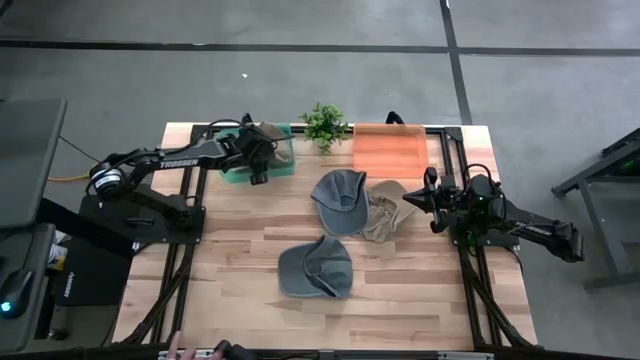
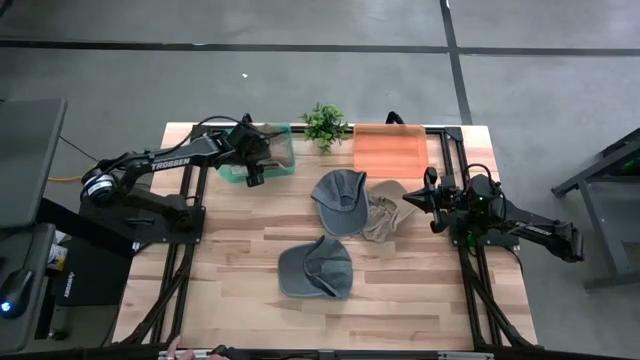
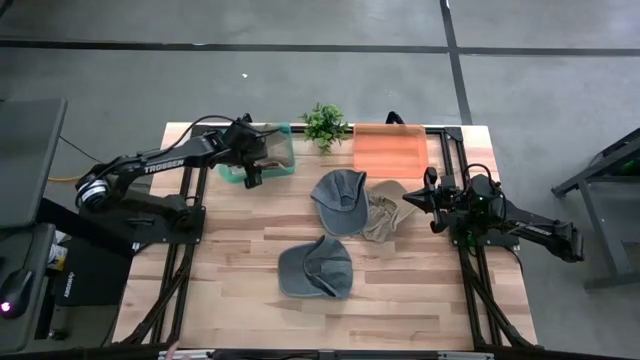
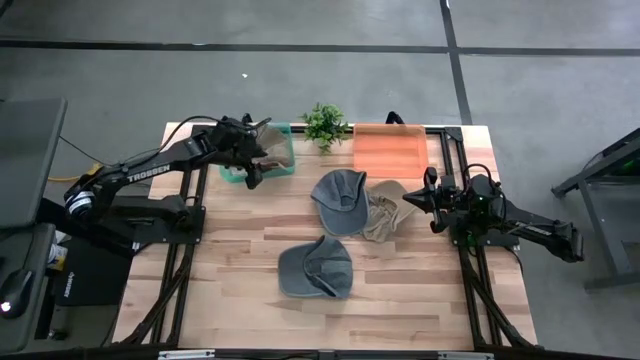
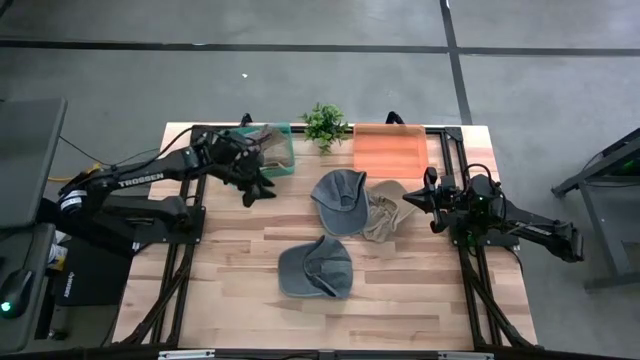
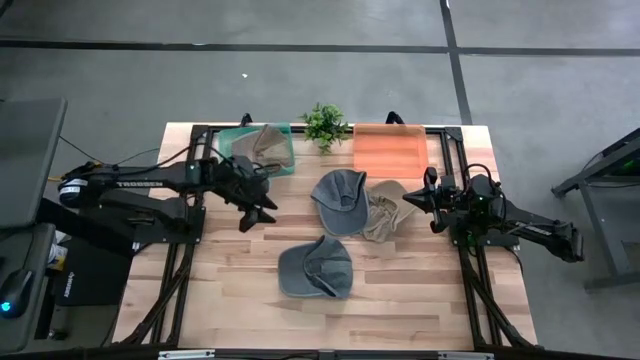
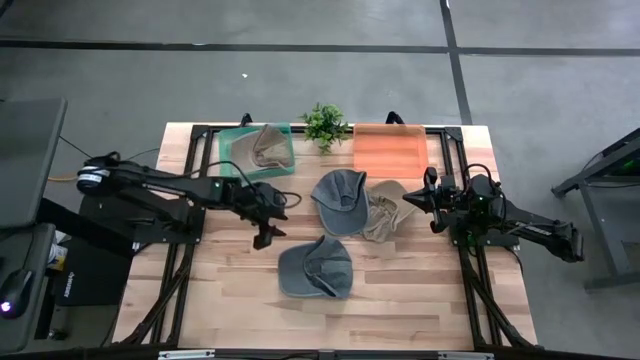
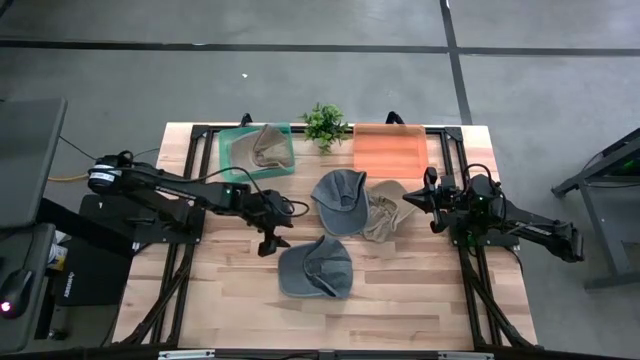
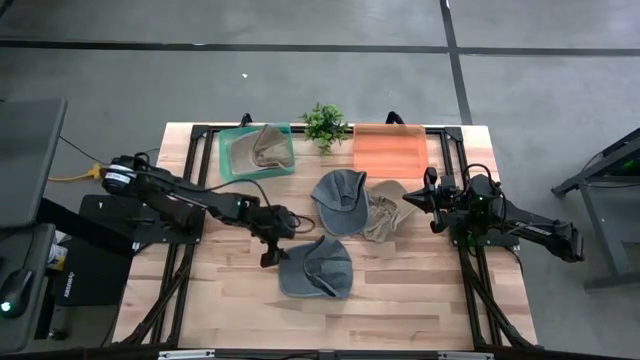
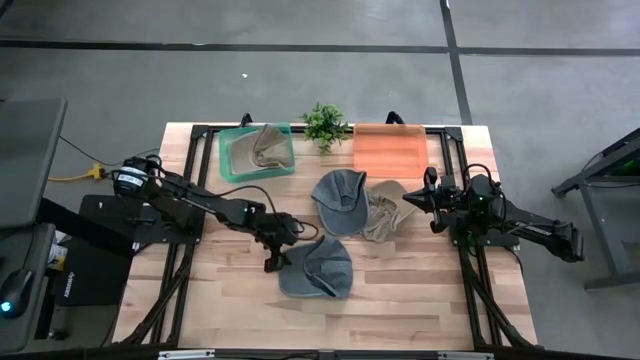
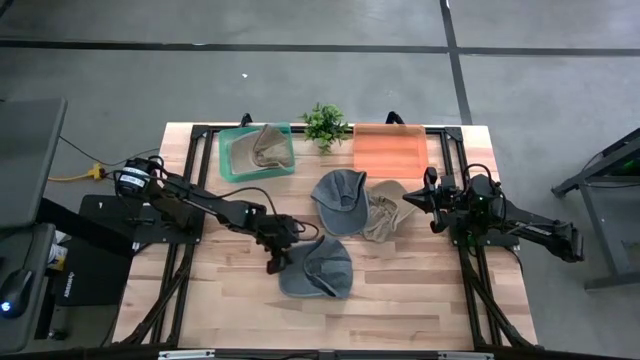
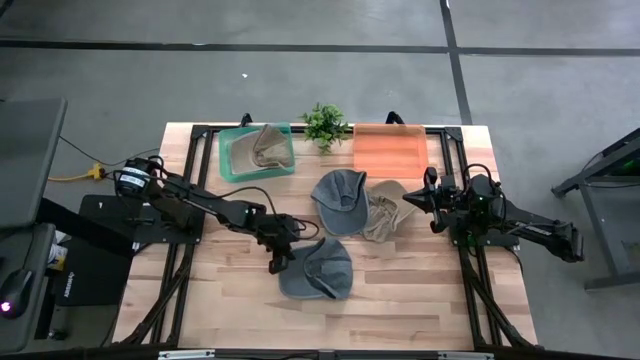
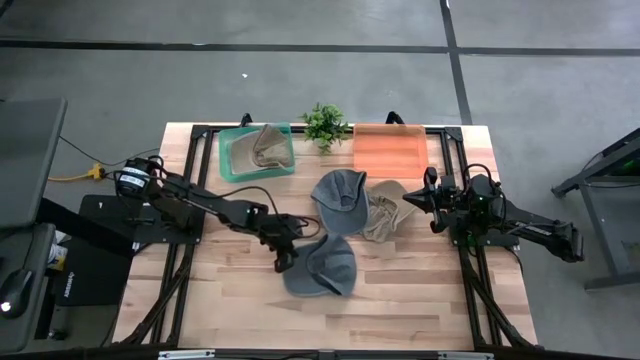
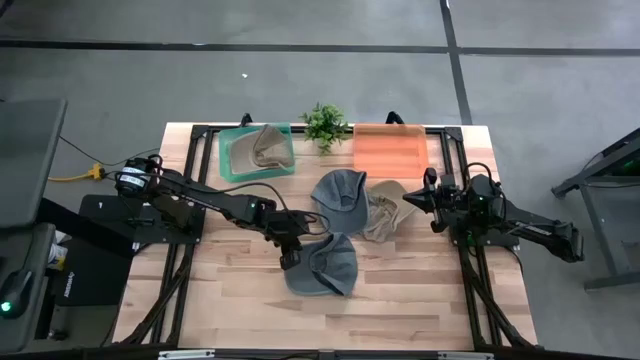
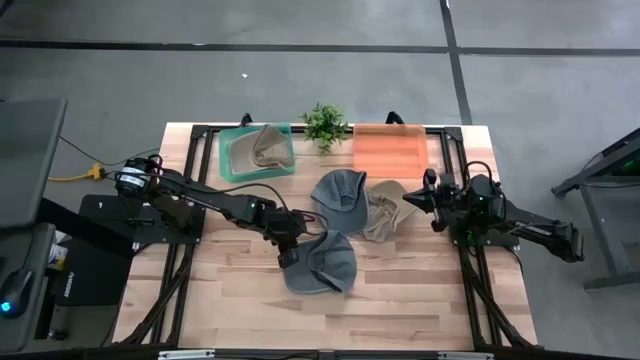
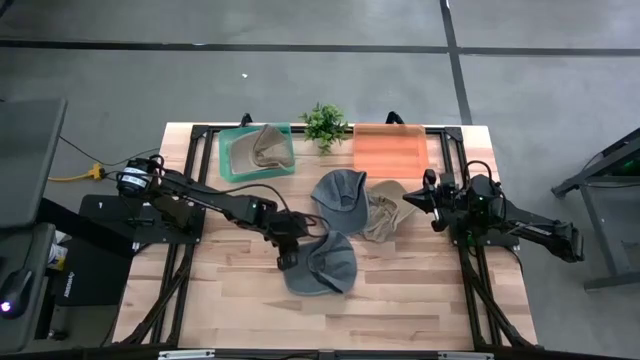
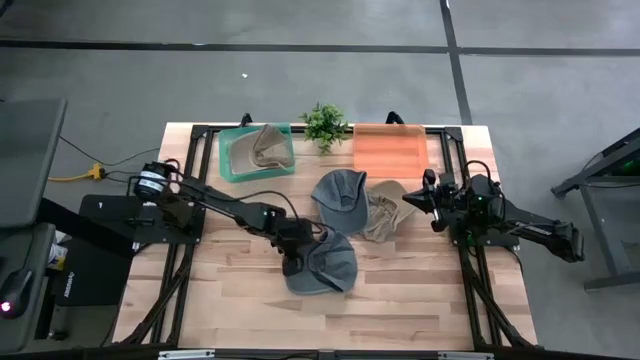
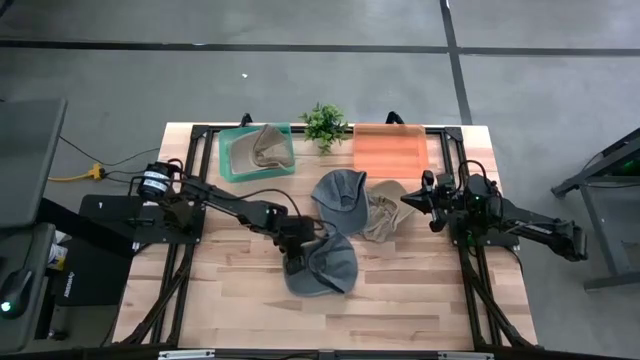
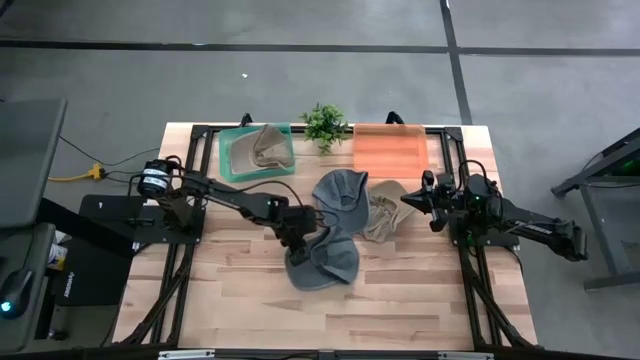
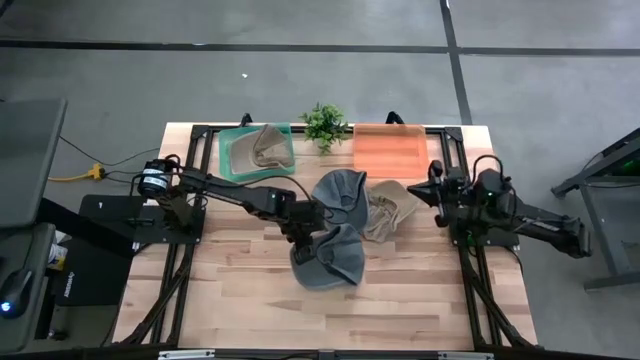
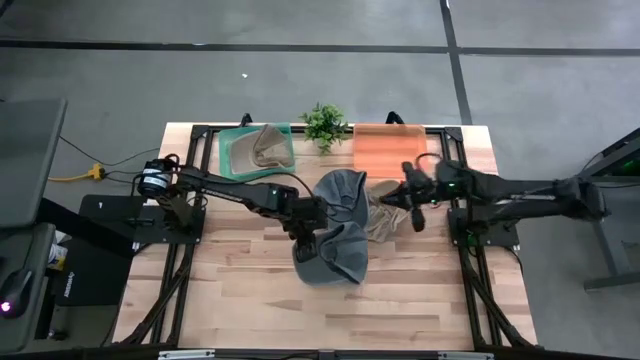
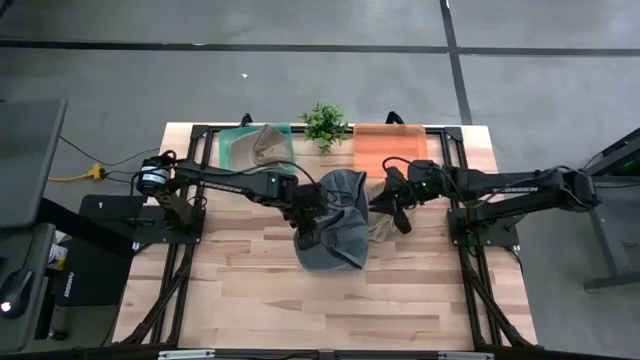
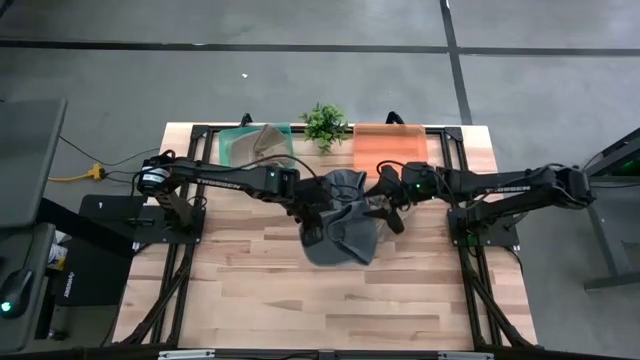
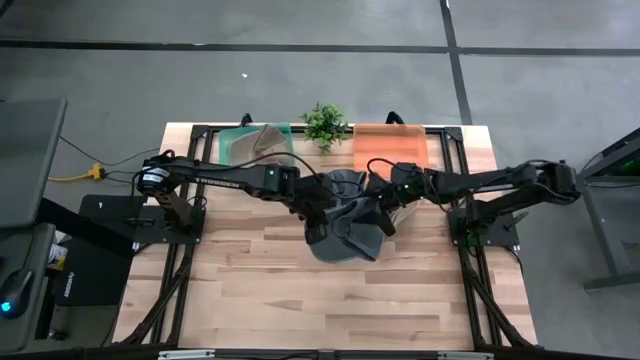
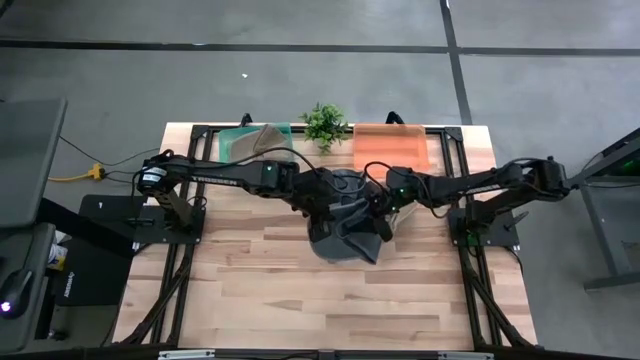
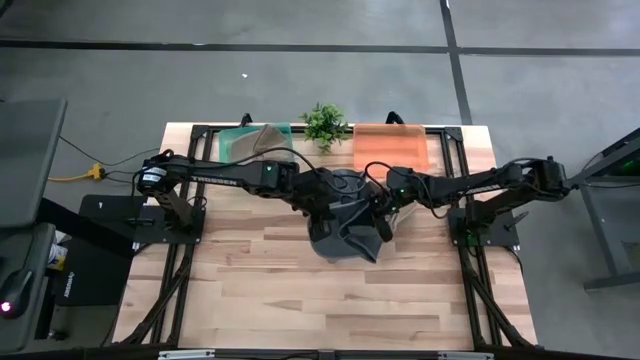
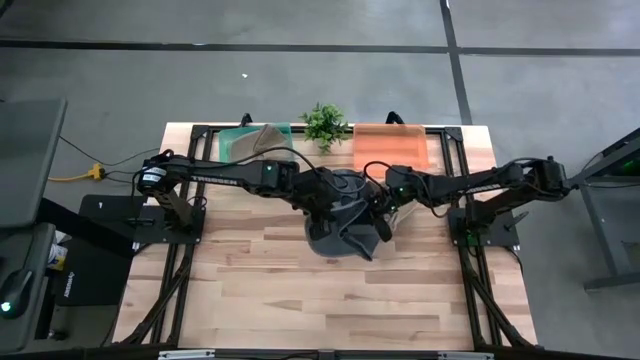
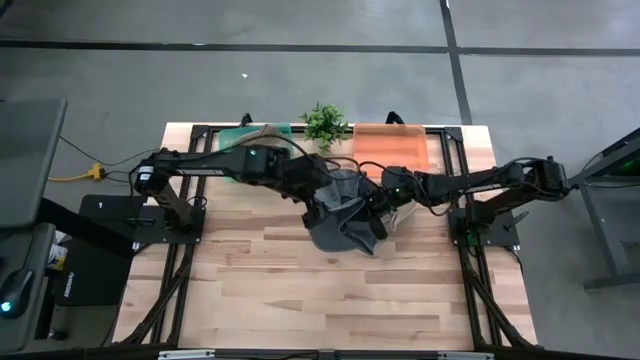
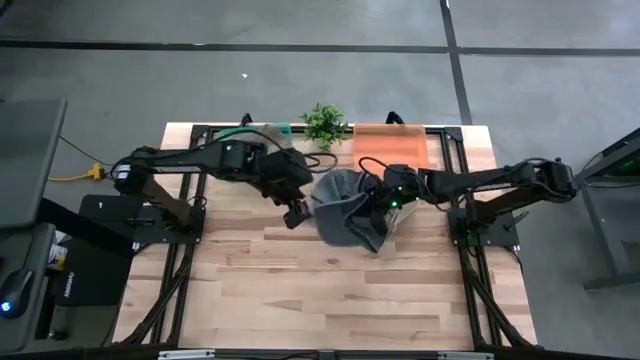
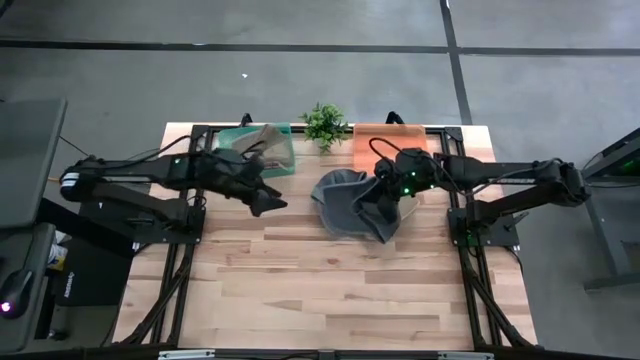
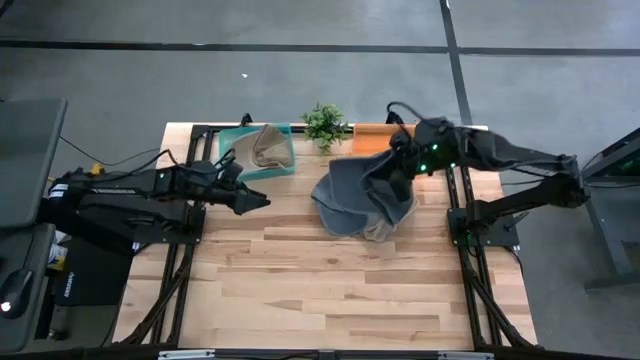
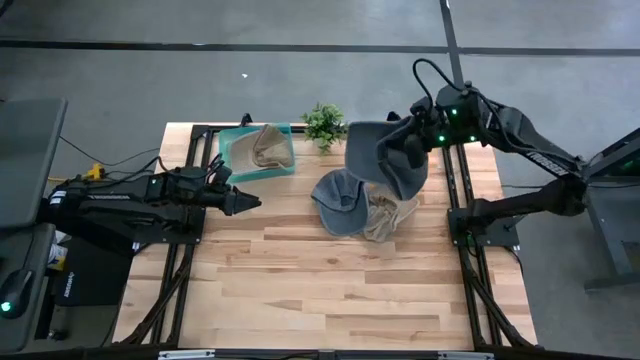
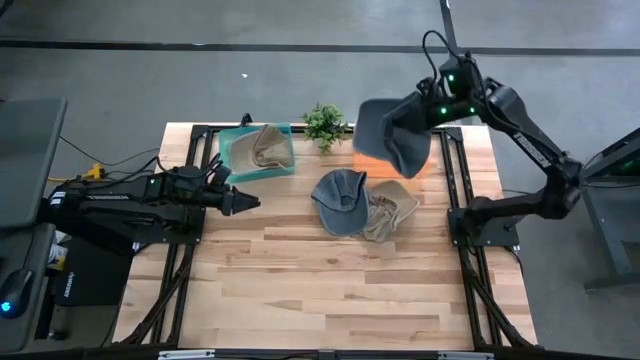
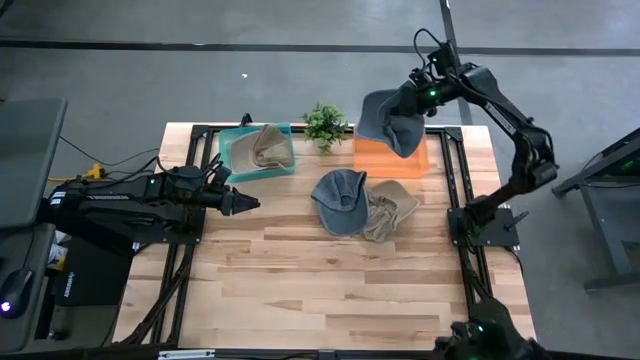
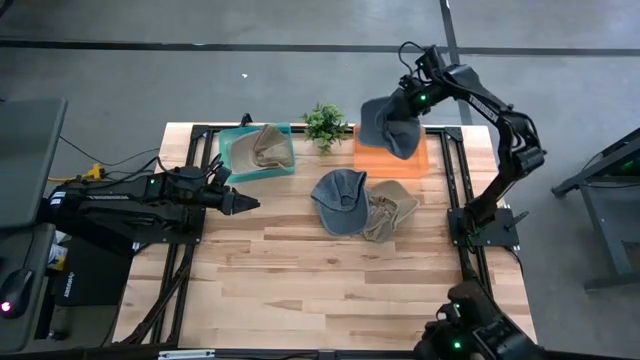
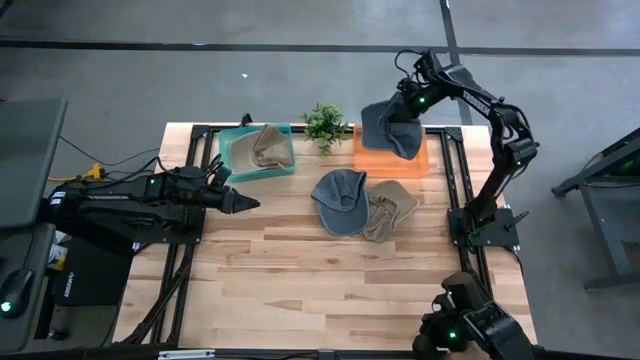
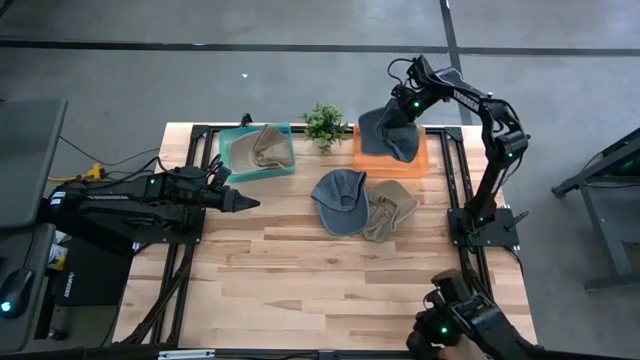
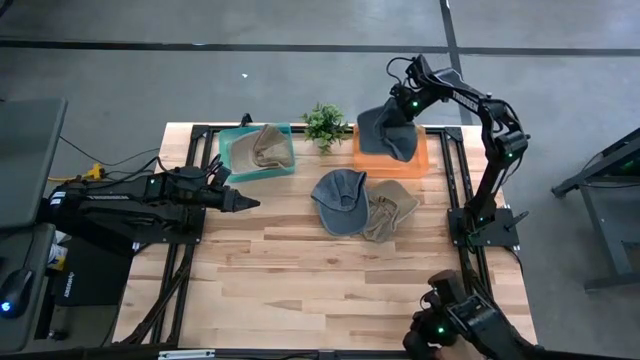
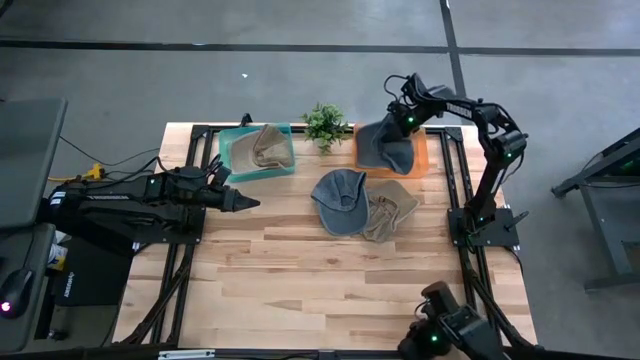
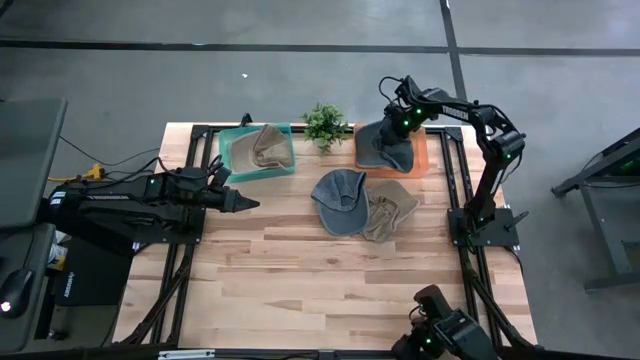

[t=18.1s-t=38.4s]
Task: Pick & Place hat
Put the bottom blue cap into the orange bin

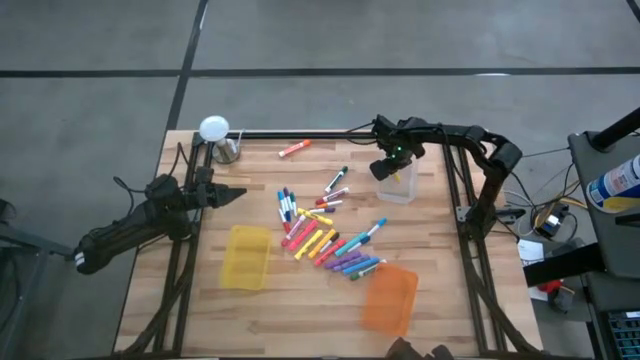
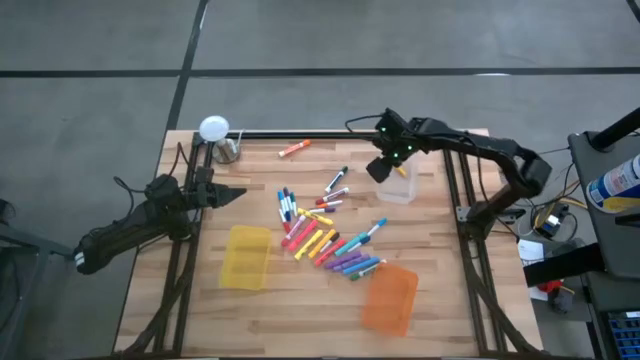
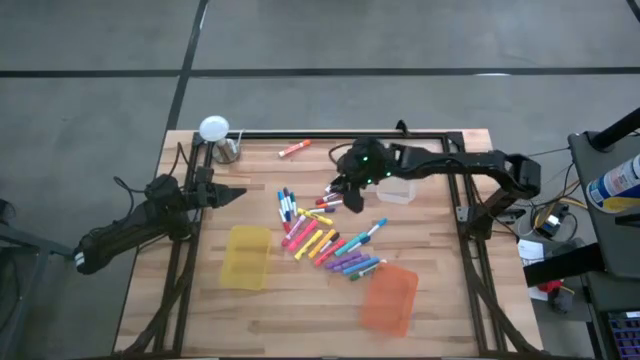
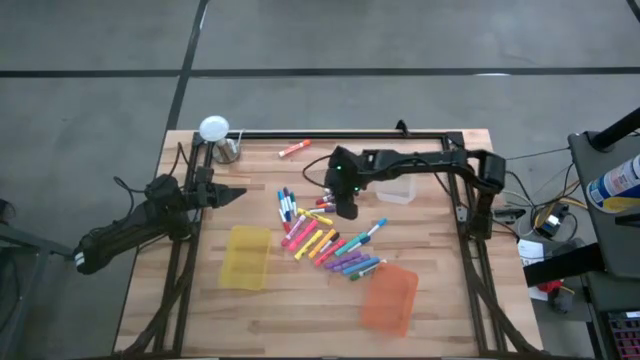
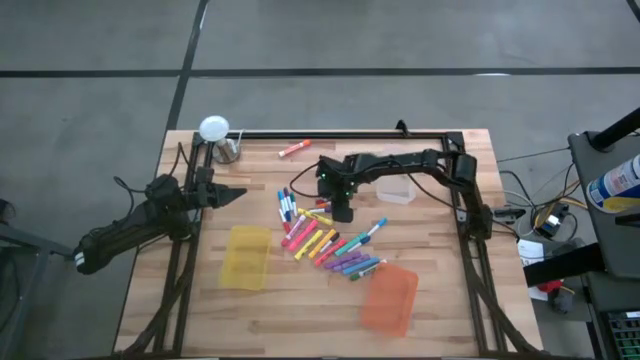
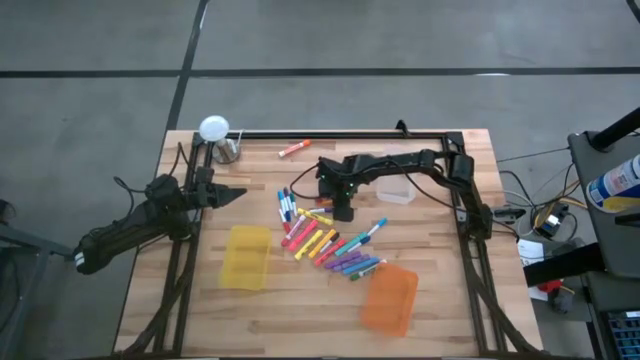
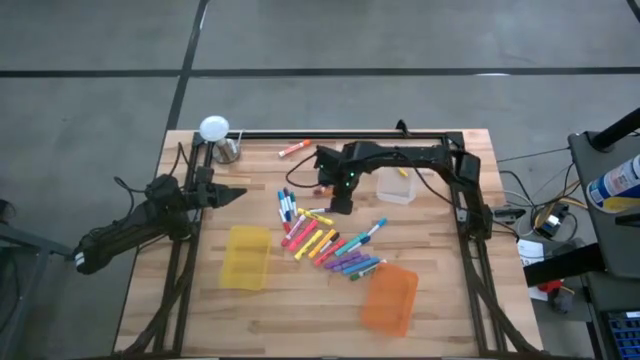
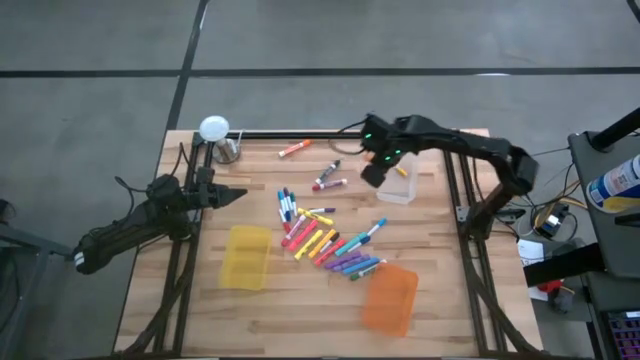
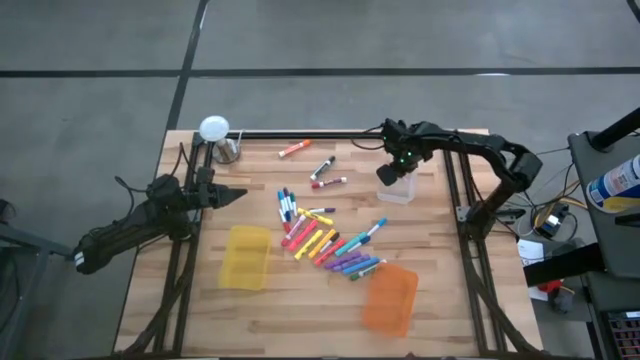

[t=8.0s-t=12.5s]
Task: Pick & Place Markers
Put the small orange highlighter pen into the transparent bin
